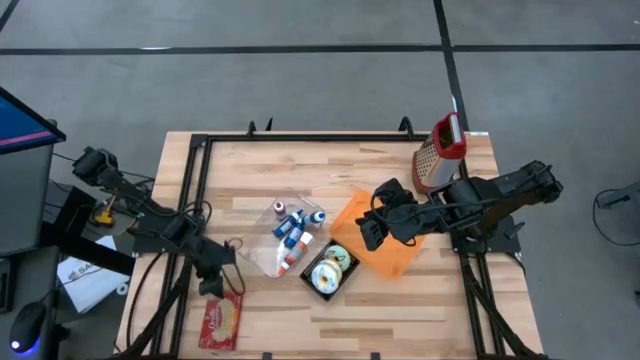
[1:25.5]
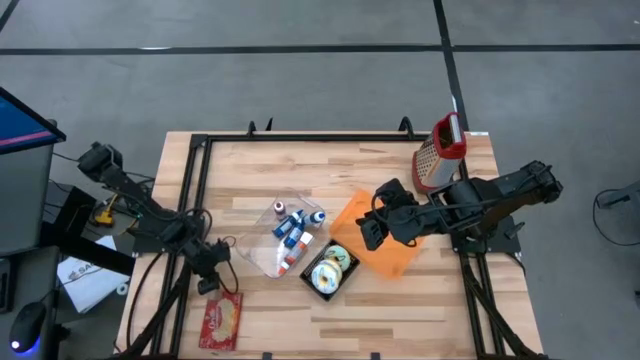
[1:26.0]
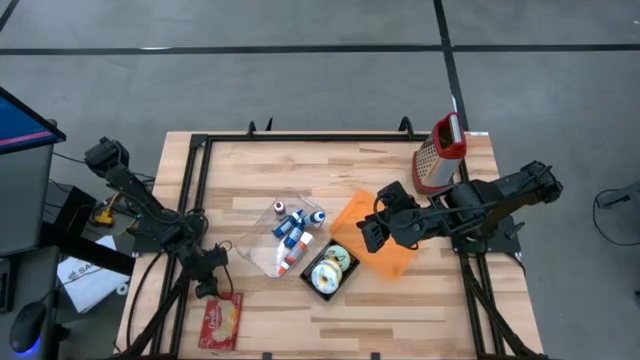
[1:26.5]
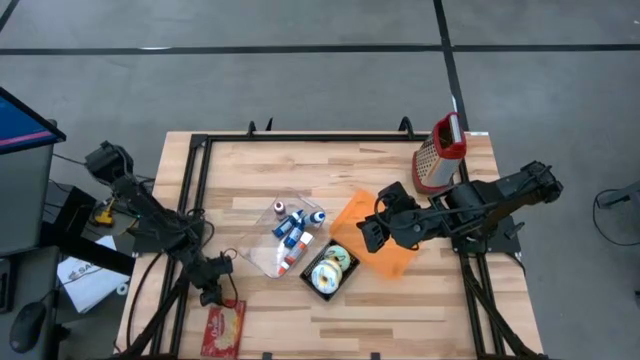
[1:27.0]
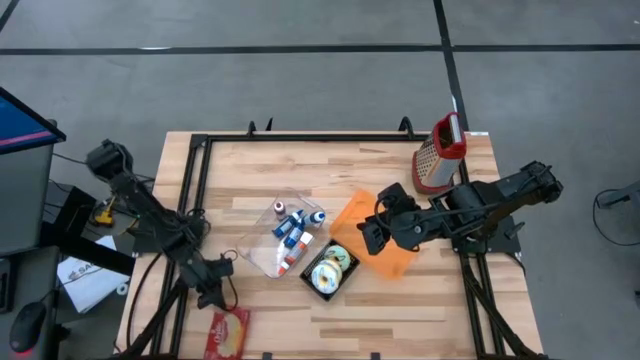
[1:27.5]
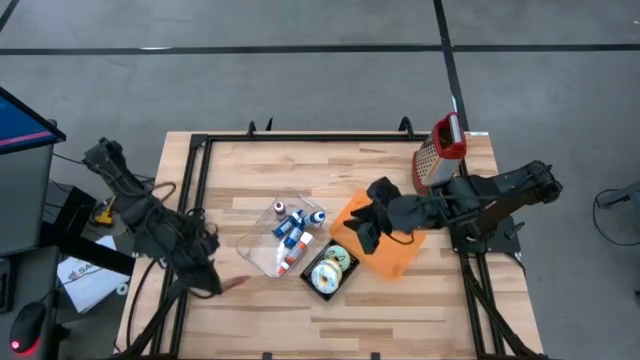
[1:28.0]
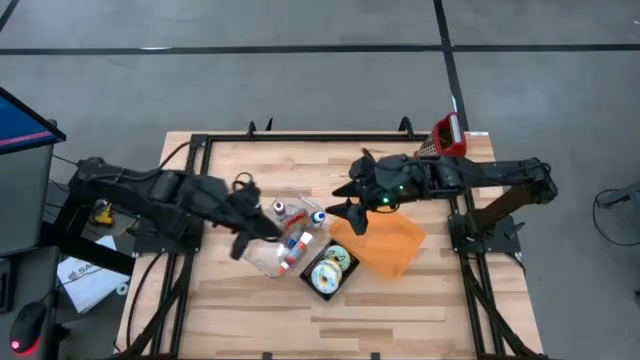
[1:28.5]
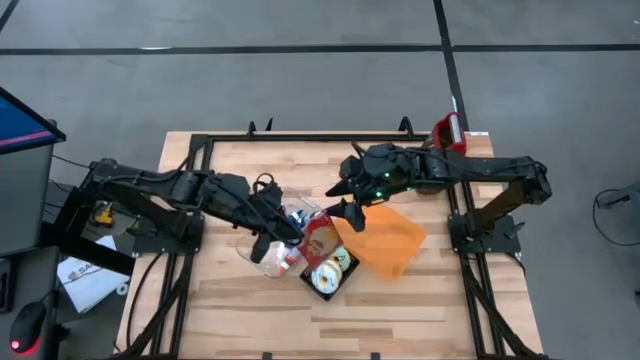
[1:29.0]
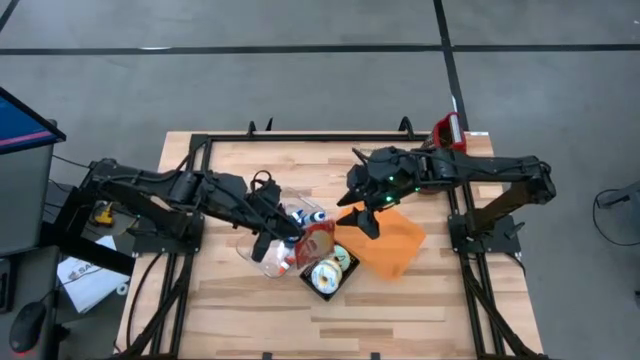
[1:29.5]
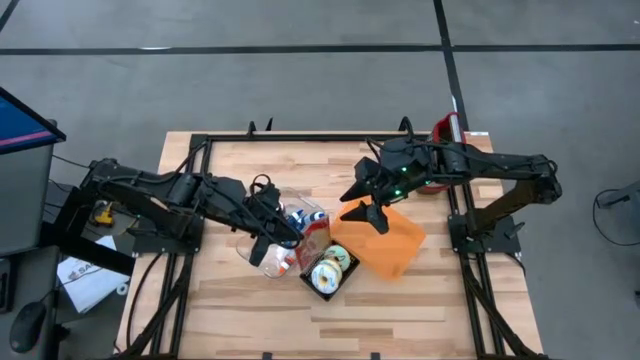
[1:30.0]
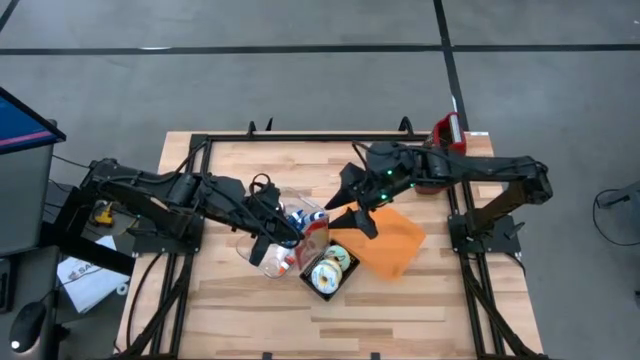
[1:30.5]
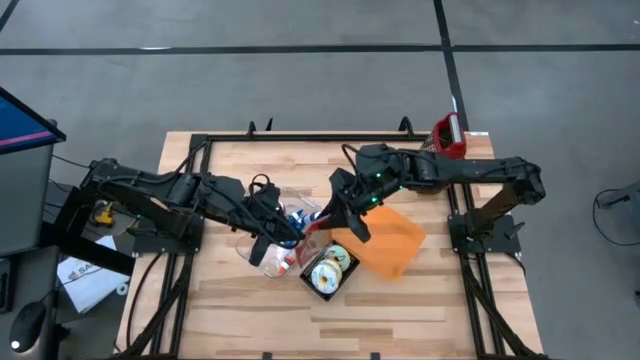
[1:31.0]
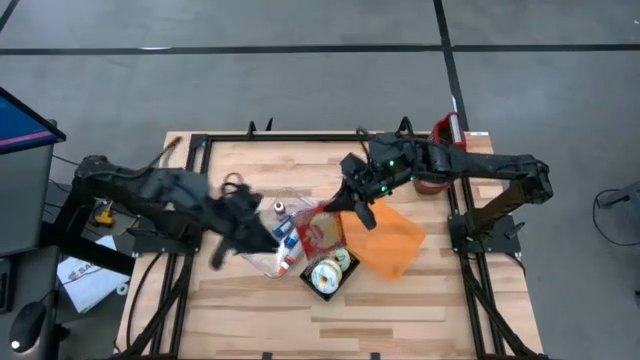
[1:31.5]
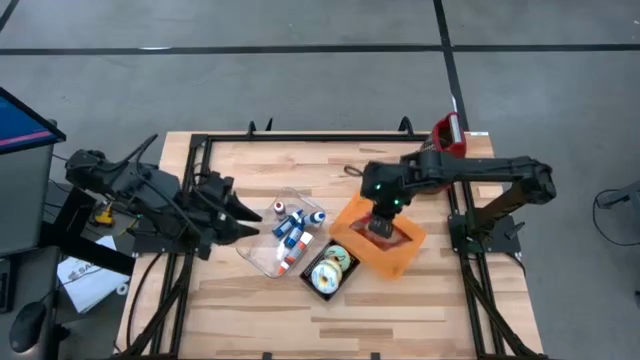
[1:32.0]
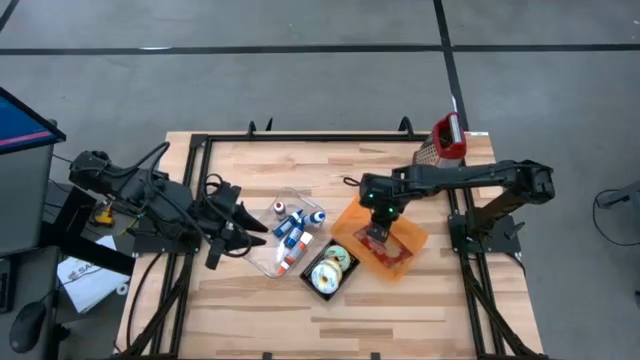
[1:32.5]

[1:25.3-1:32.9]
Put the red popcorn bag into the orange bin

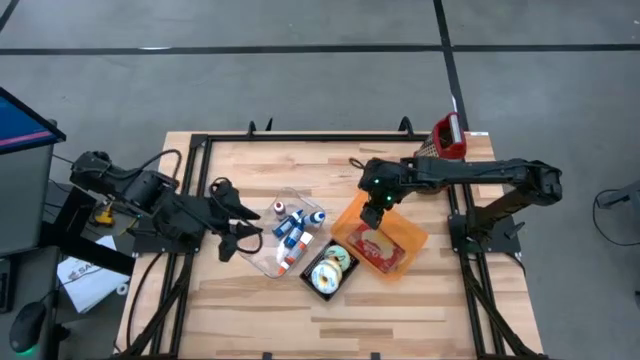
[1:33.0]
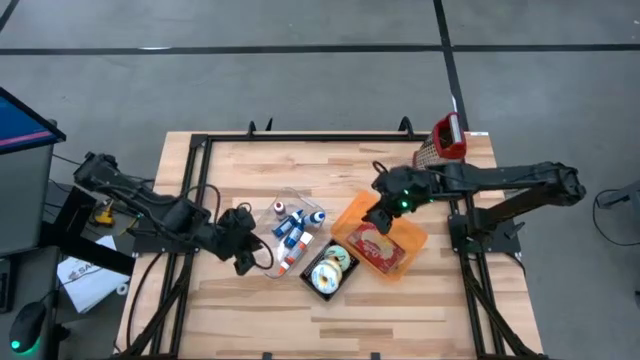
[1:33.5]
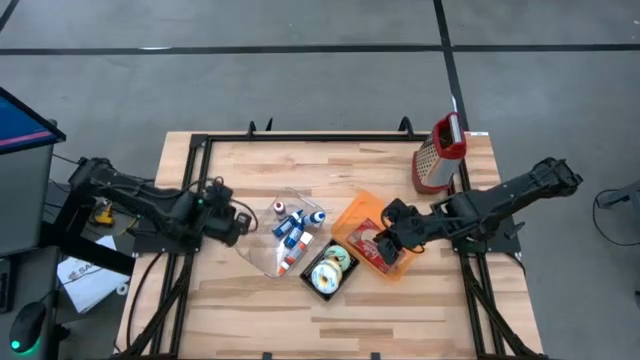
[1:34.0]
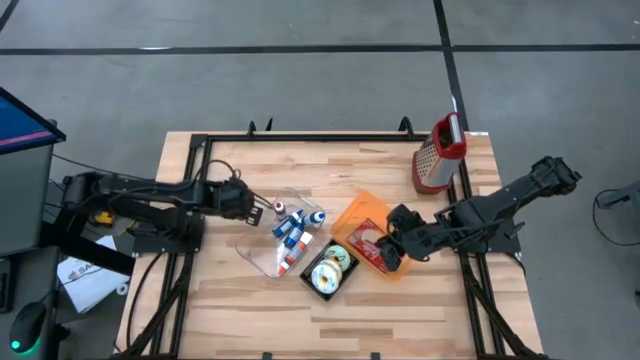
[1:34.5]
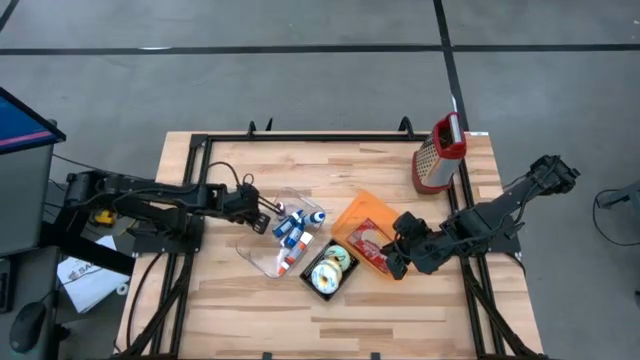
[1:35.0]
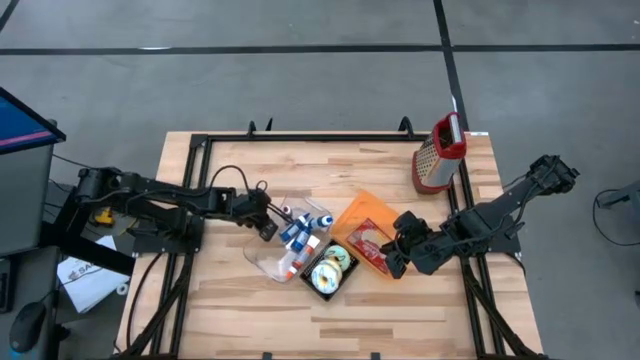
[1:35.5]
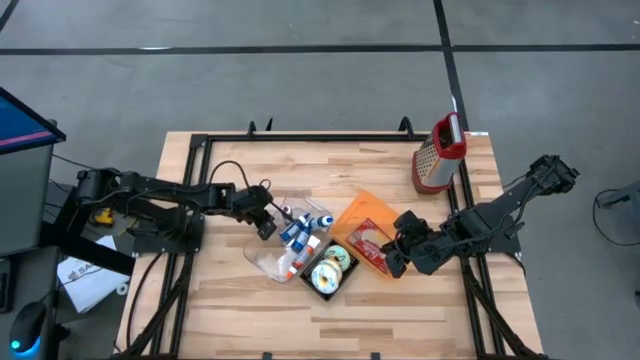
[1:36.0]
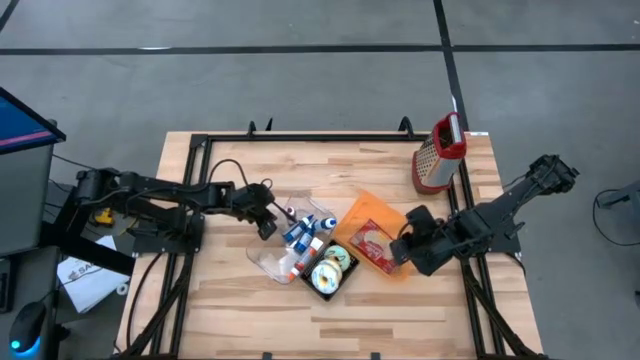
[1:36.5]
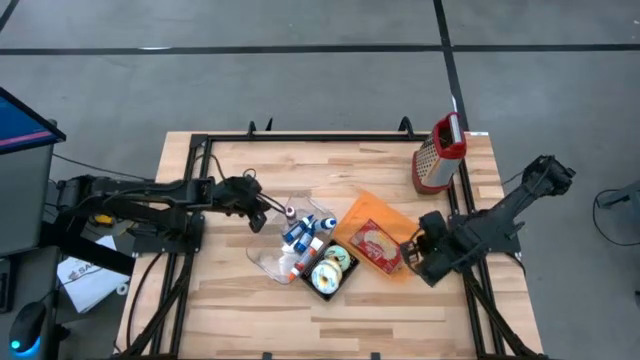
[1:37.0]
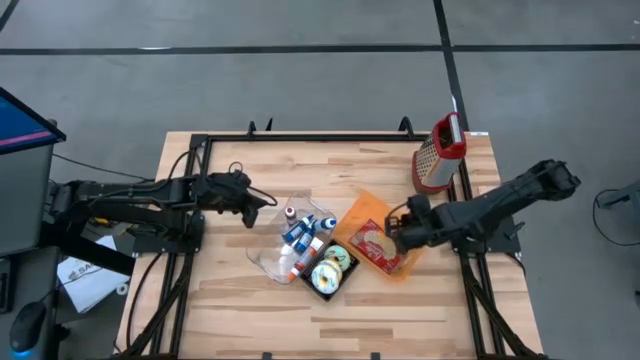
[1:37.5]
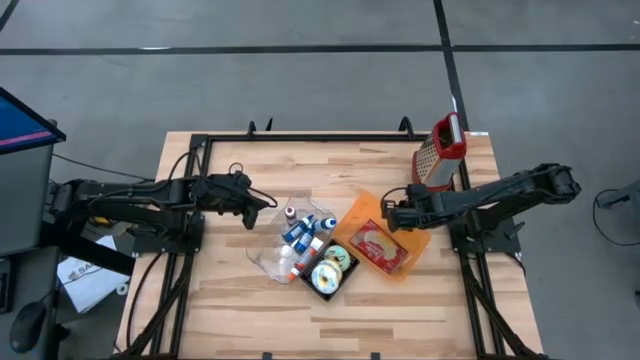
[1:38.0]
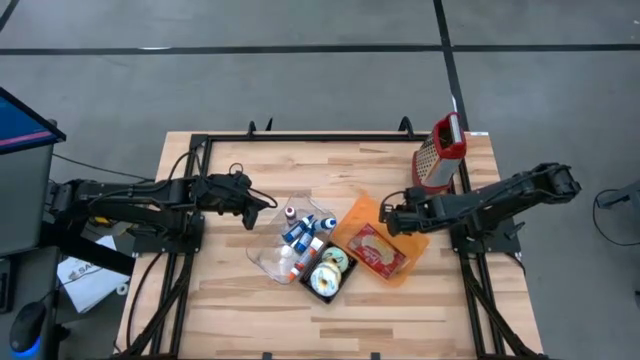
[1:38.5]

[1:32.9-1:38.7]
Adjust the bins

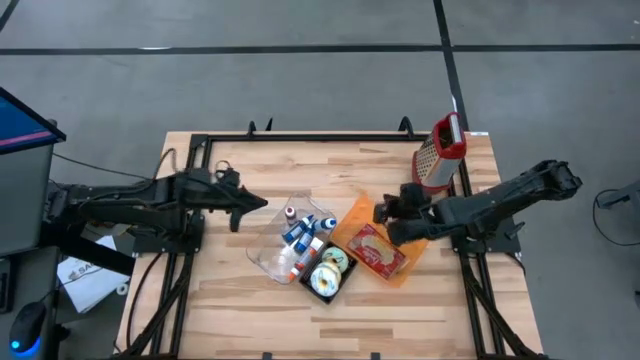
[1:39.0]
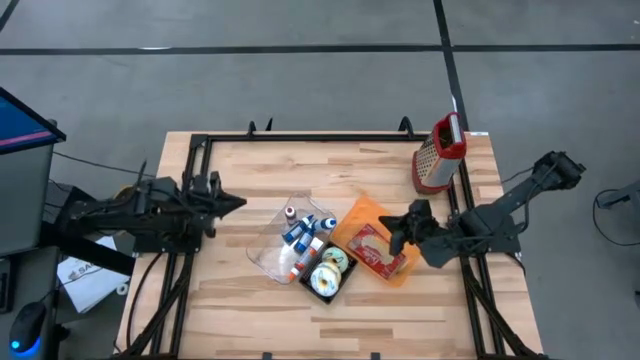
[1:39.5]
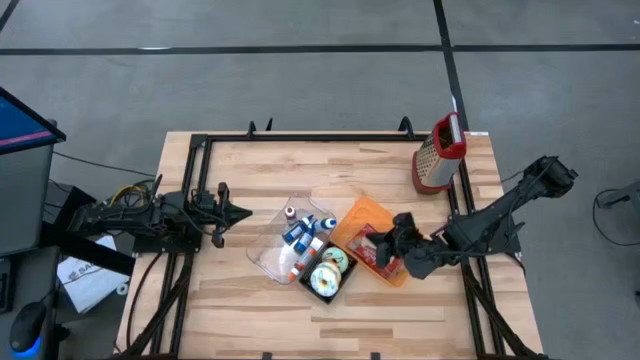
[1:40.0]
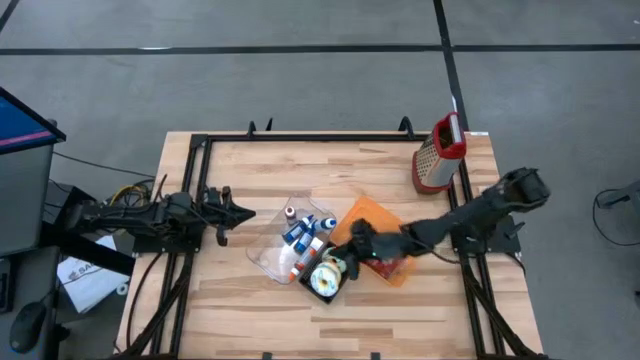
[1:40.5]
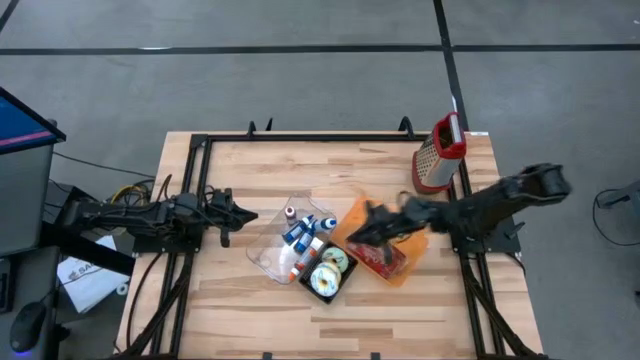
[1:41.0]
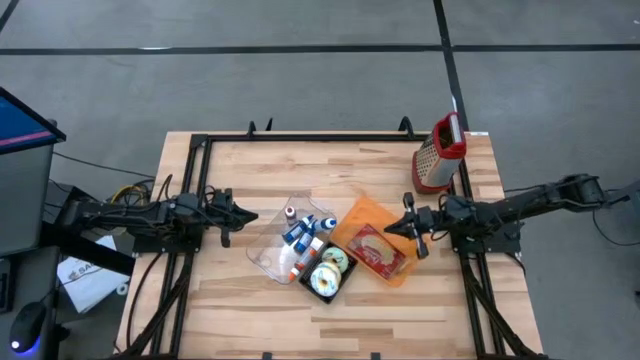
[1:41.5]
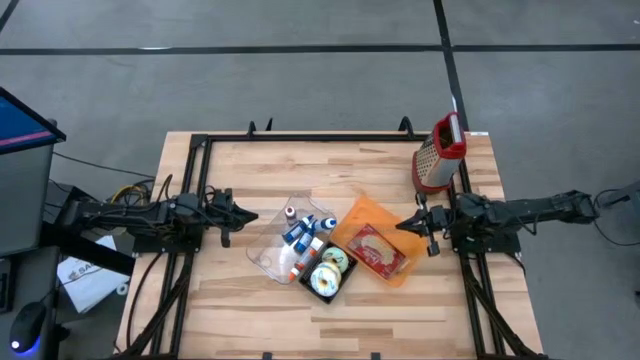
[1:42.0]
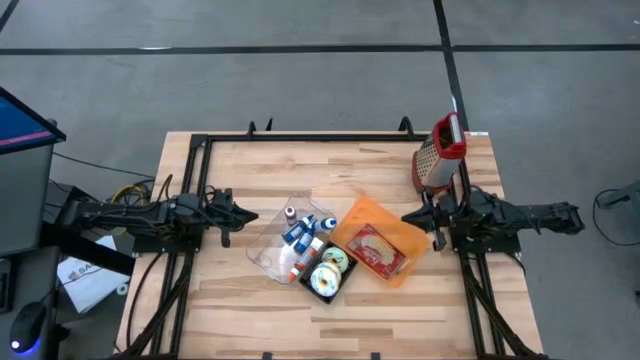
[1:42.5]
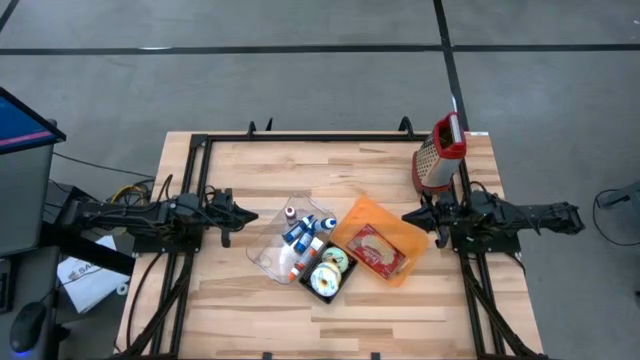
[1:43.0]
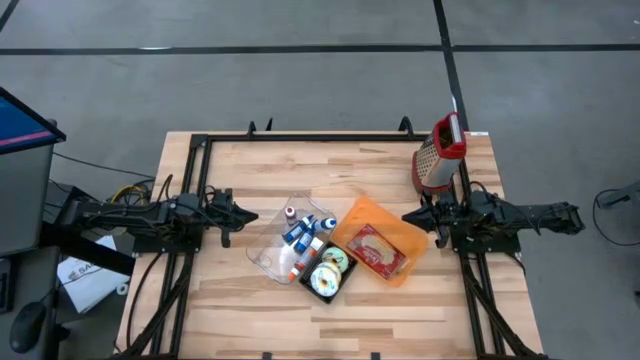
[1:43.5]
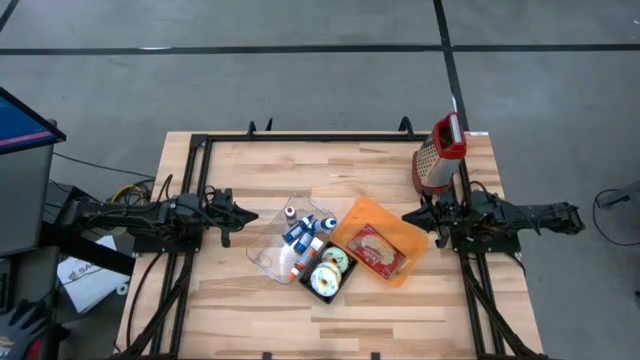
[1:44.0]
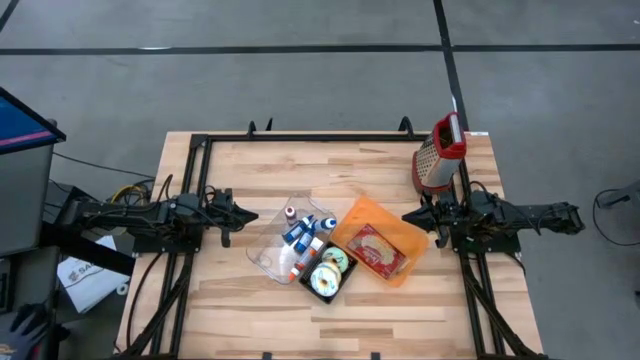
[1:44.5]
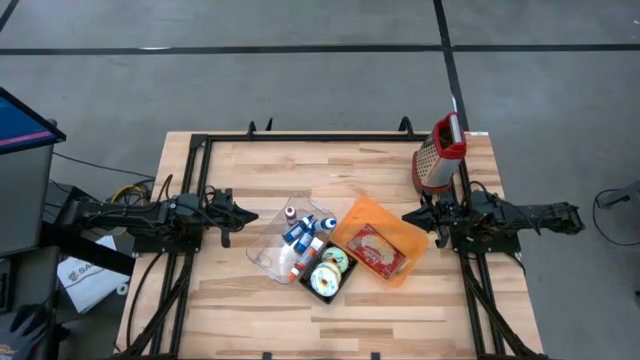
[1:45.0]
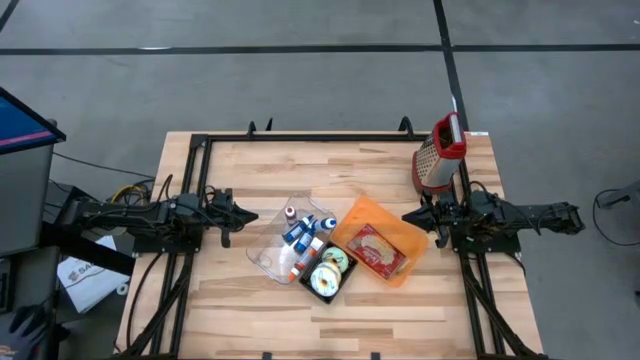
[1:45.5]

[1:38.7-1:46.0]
Return to Home Position
